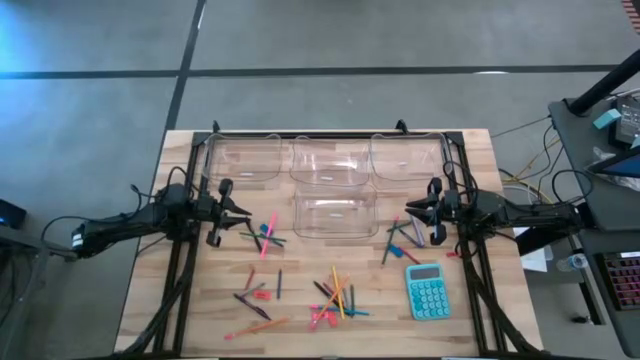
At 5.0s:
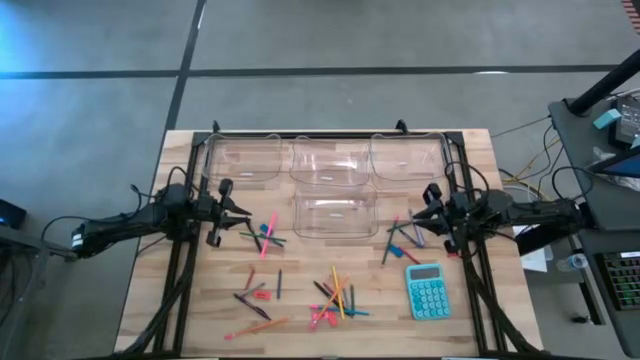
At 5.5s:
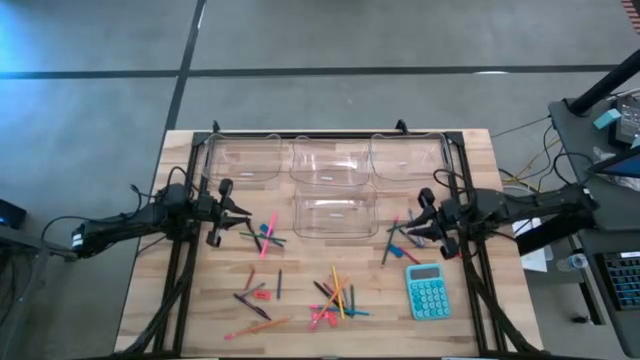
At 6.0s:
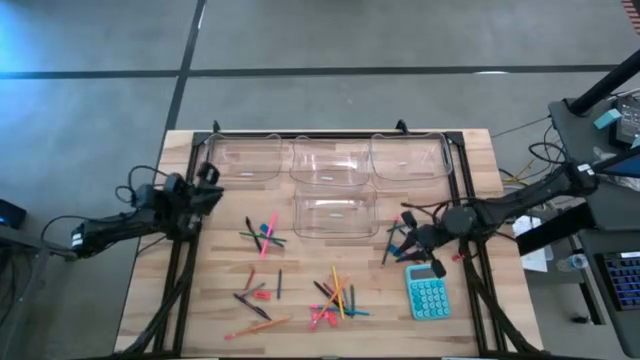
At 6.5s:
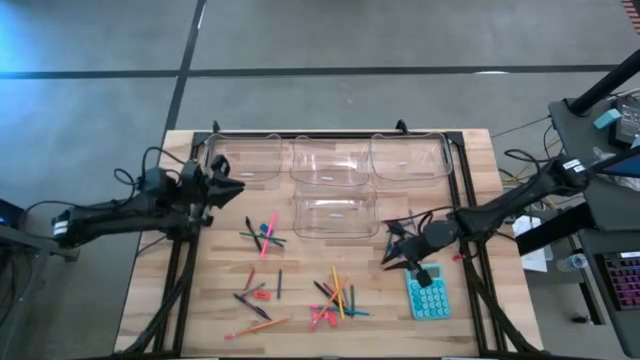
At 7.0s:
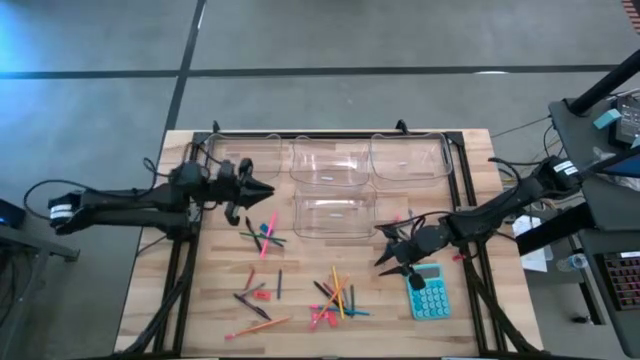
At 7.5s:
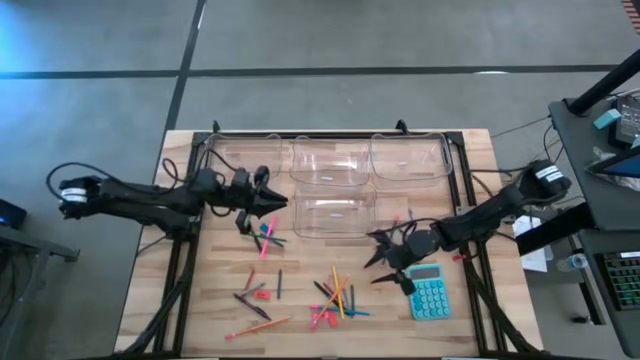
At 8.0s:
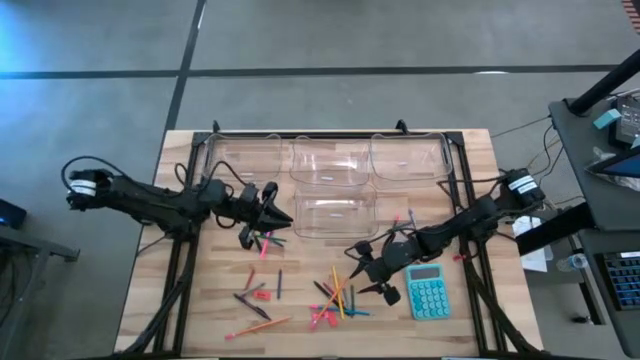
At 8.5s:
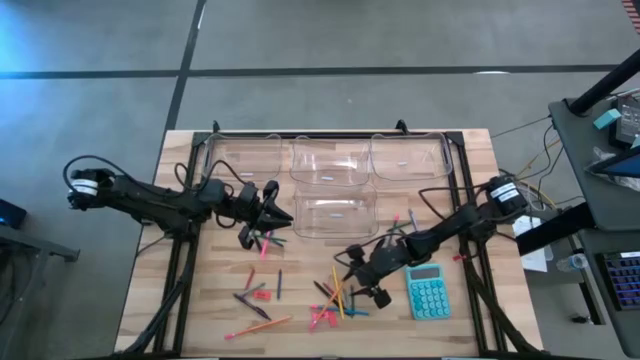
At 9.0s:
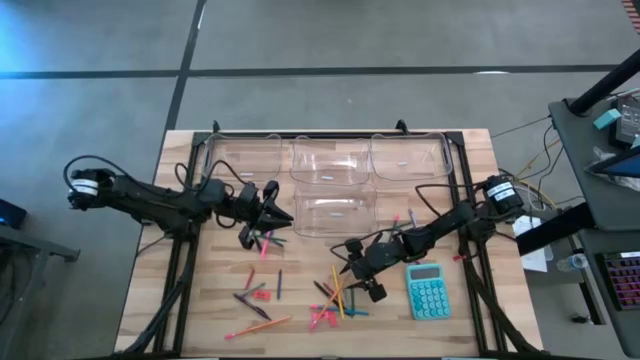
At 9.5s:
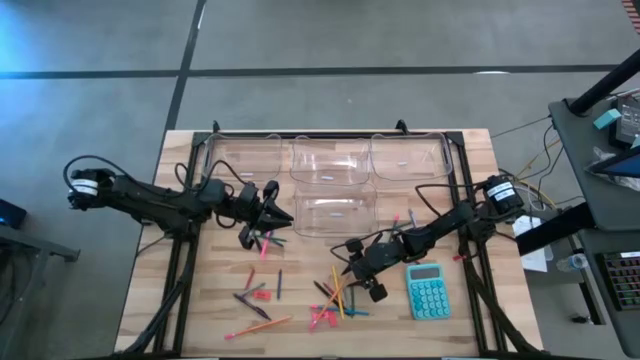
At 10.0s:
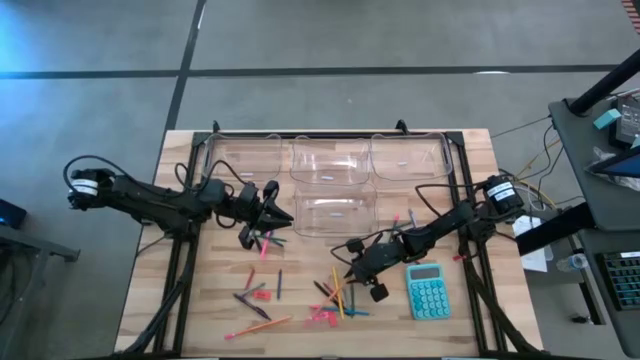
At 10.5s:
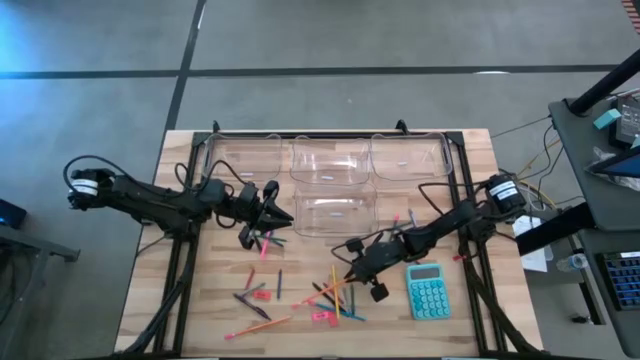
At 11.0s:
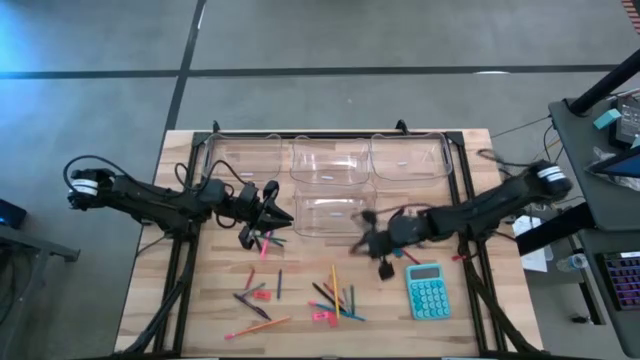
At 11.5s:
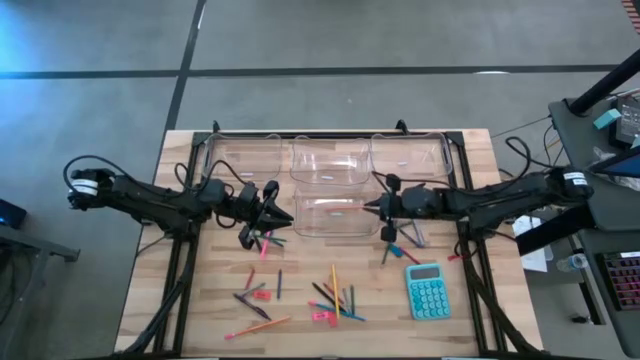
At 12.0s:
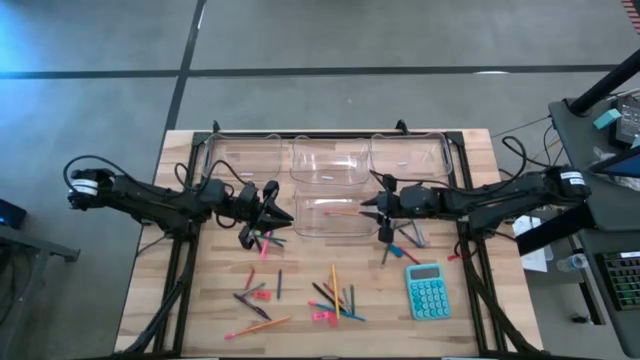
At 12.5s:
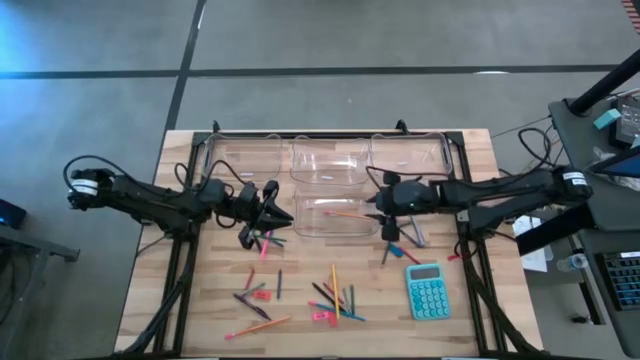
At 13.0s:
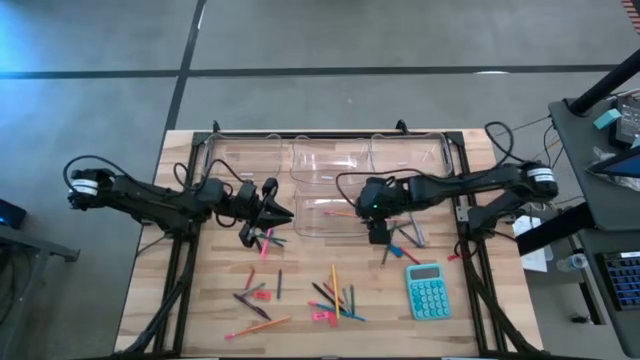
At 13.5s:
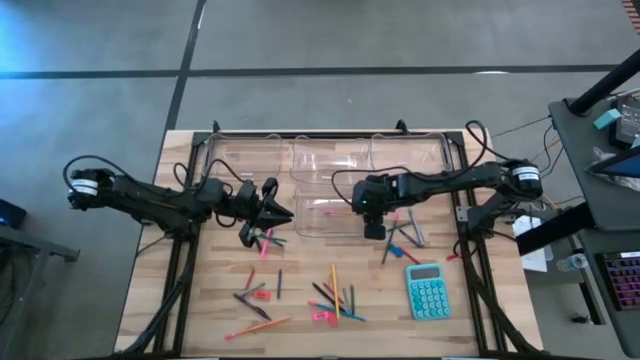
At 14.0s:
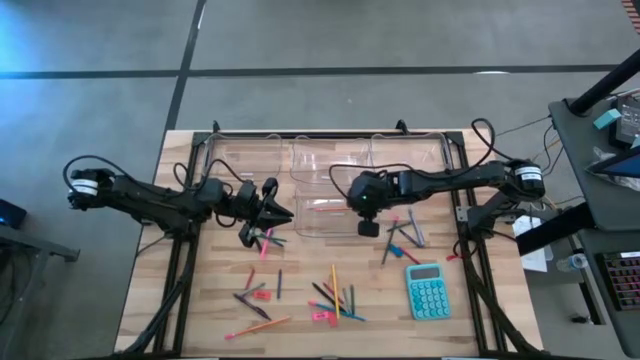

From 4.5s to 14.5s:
Task: Sort crayons/erasers/pens/pencils in bins
Put the right orange pencil into the bottom transparent bin

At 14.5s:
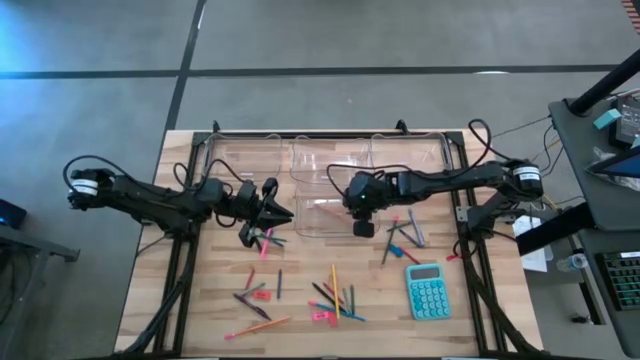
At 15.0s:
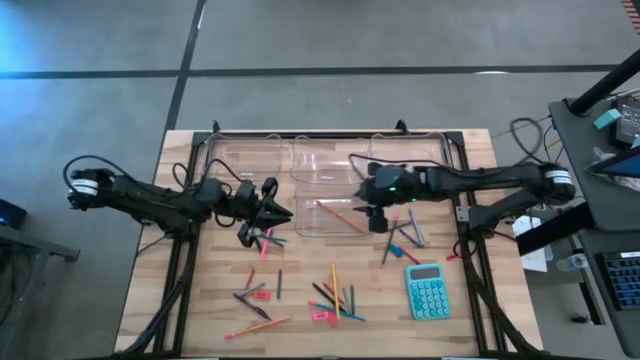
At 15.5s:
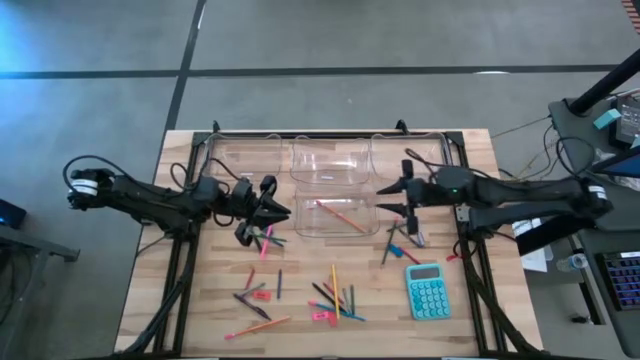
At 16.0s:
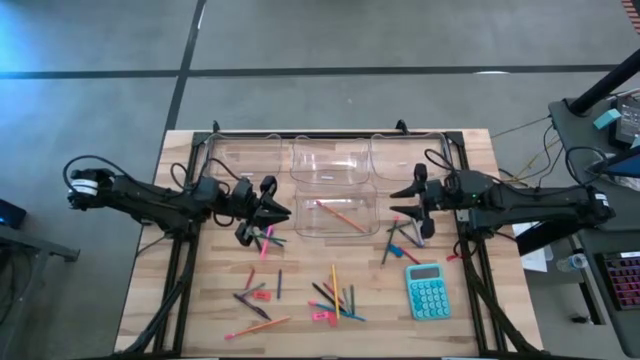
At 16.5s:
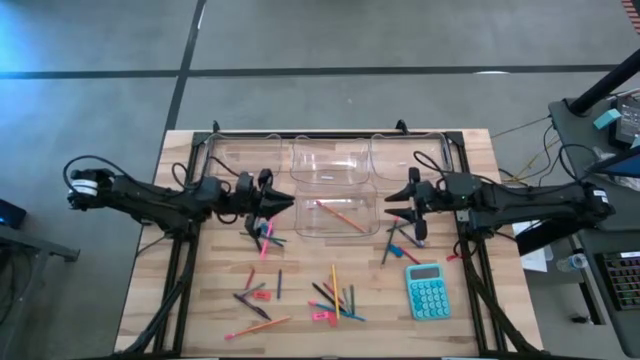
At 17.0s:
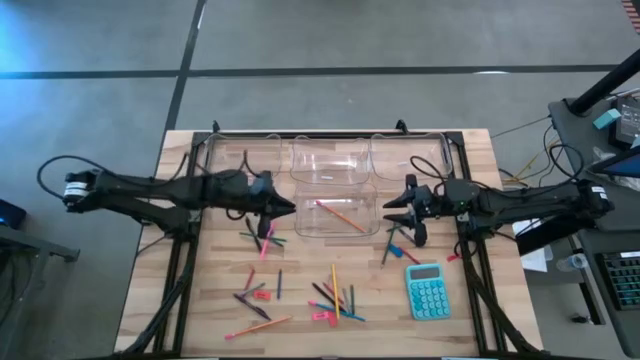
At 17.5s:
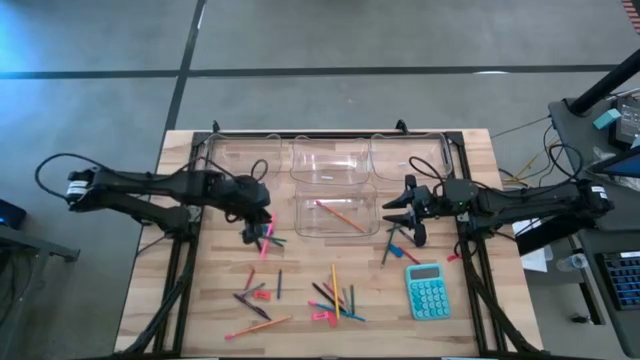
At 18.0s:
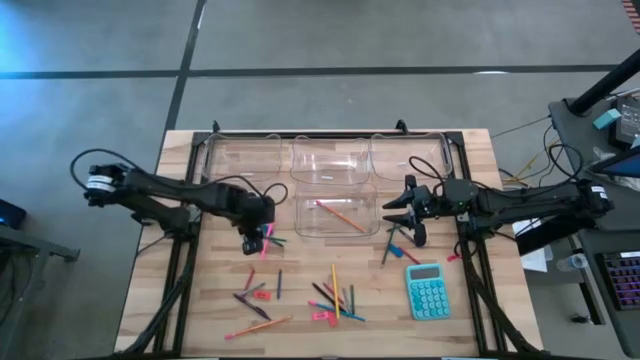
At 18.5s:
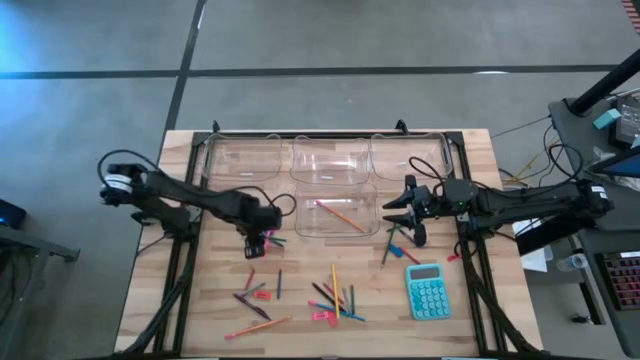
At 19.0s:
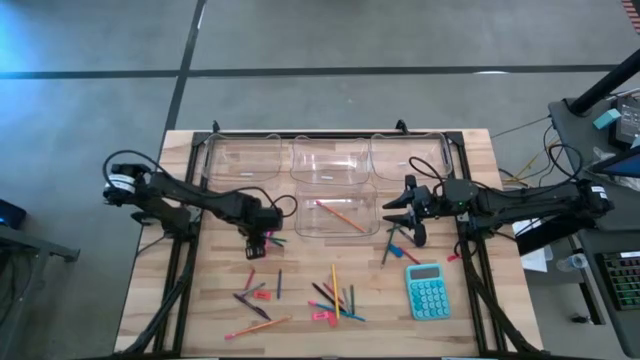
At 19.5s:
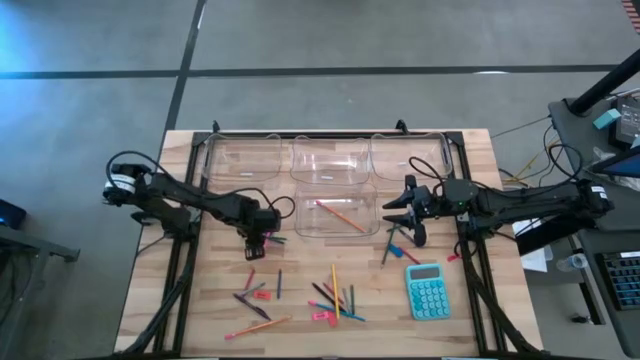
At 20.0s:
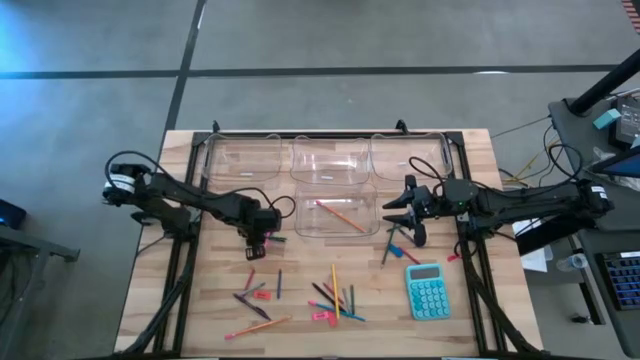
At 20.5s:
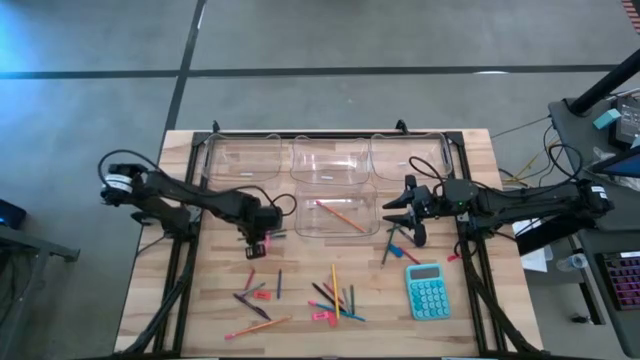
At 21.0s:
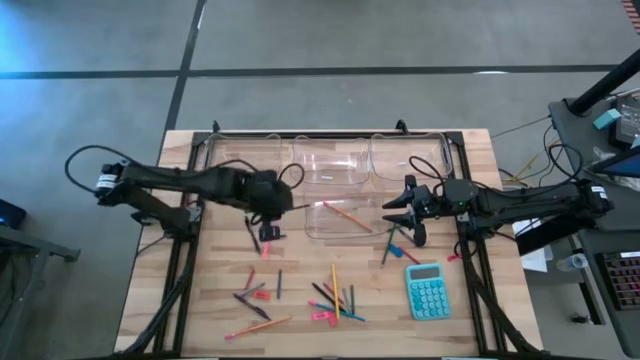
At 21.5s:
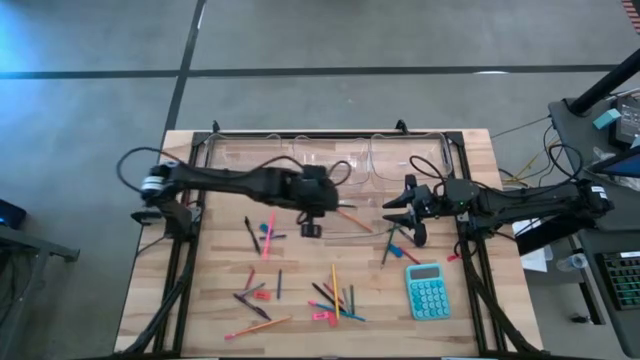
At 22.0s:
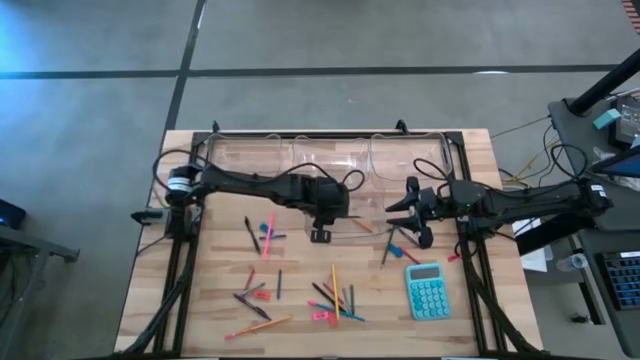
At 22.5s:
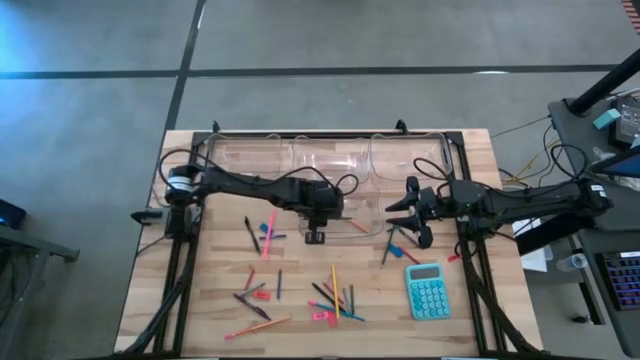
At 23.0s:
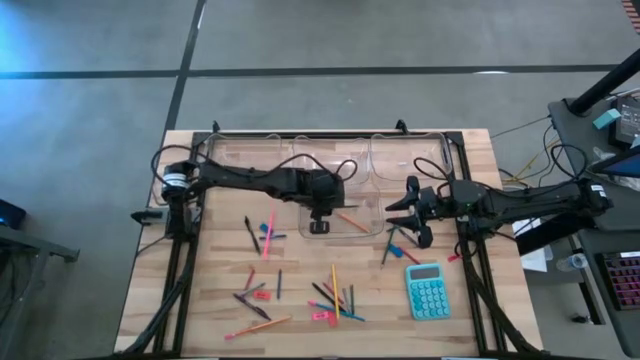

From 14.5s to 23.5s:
Put the left green pencil into the bottom transparent bin

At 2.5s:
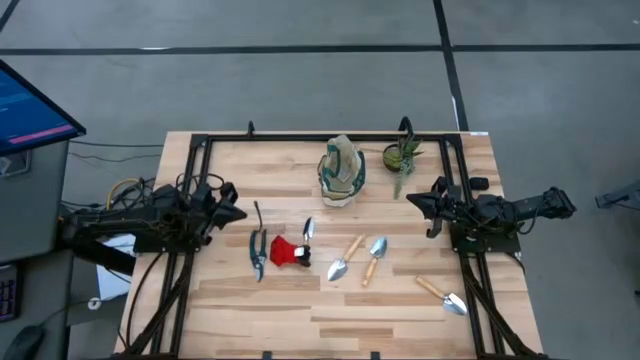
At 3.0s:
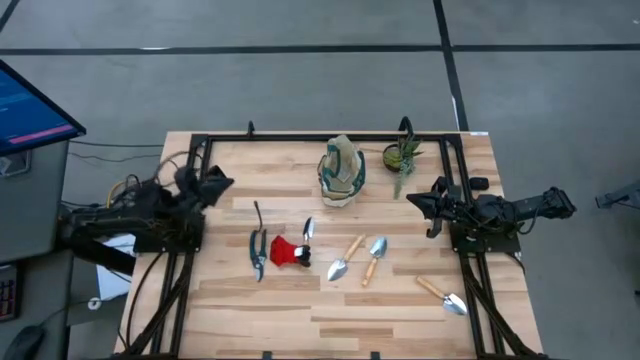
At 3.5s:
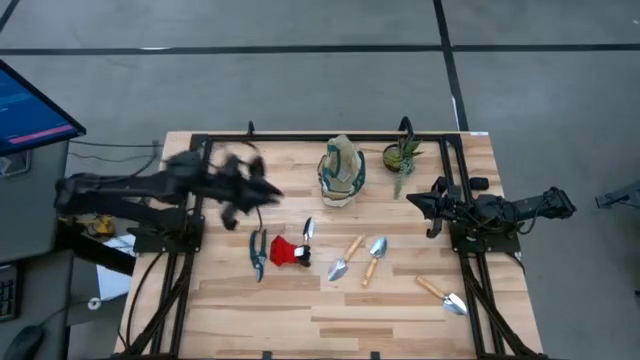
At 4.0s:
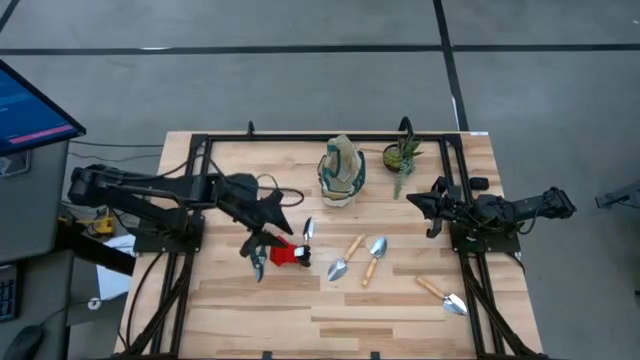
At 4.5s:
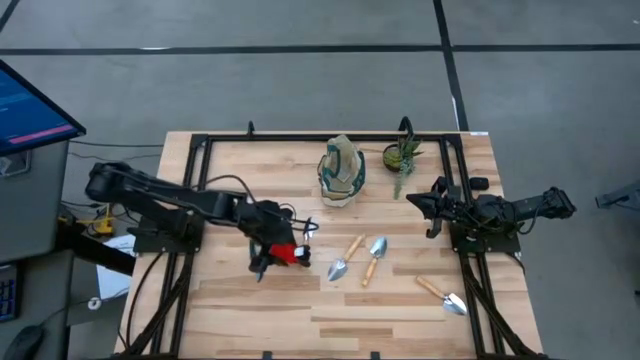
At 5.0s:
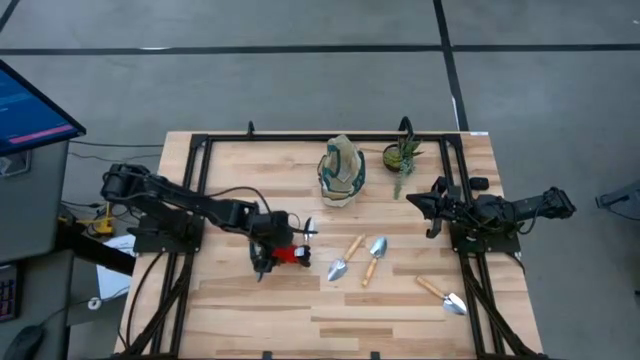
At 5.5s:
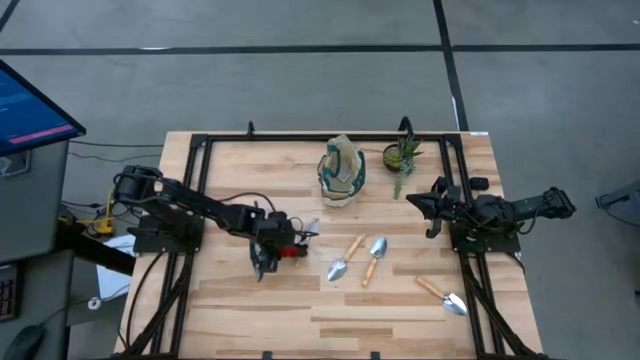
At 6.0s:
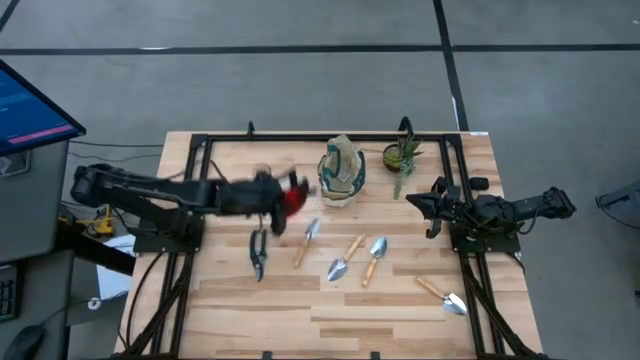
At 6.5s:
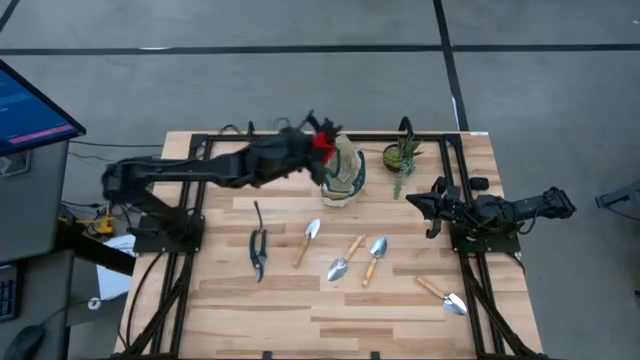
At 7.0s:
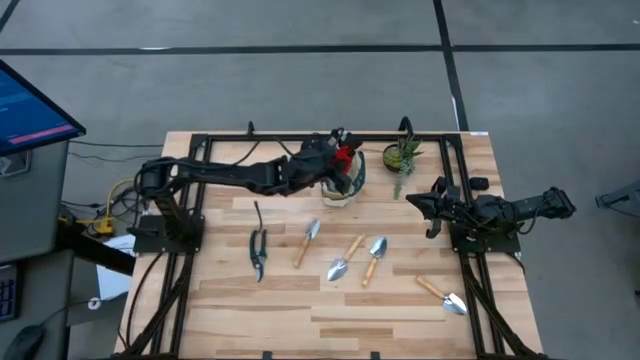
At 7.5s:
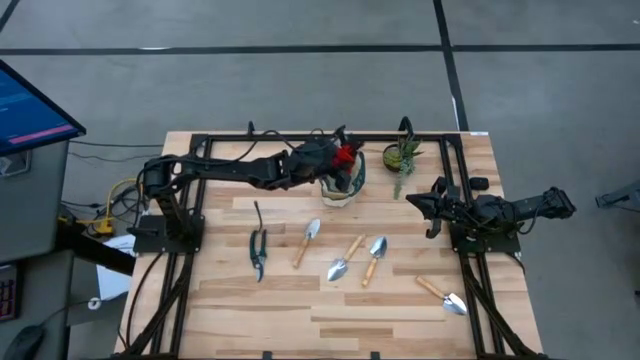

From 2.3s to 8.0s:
Task: Pick & Place Garden tools in Gardening bag
Put the red gloves into the brown gardening bag
